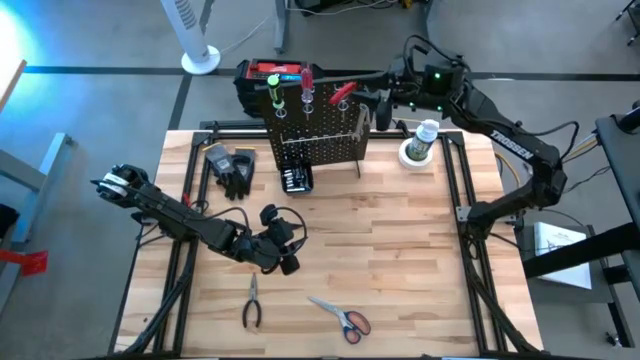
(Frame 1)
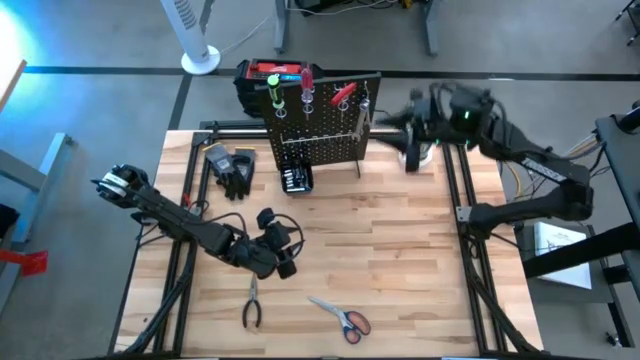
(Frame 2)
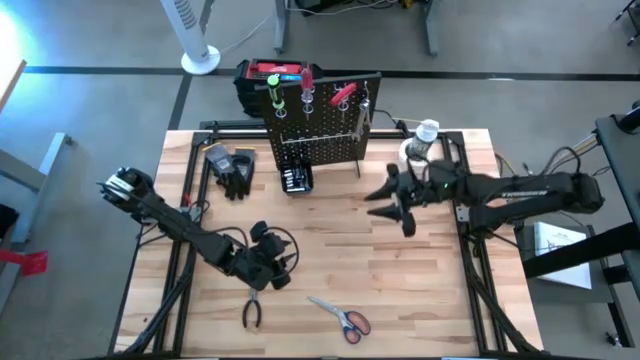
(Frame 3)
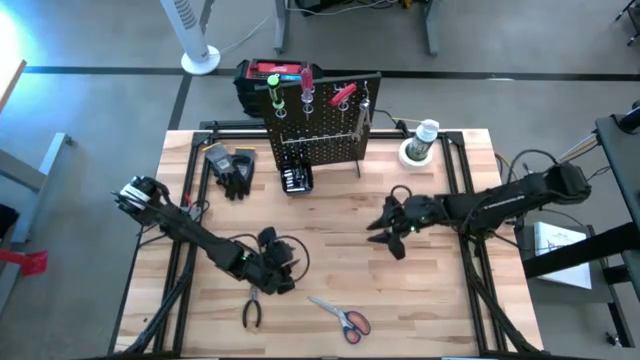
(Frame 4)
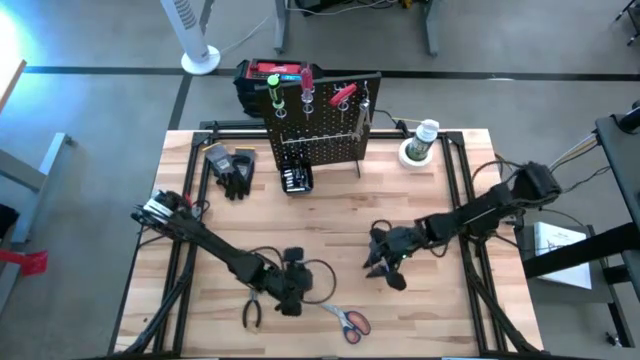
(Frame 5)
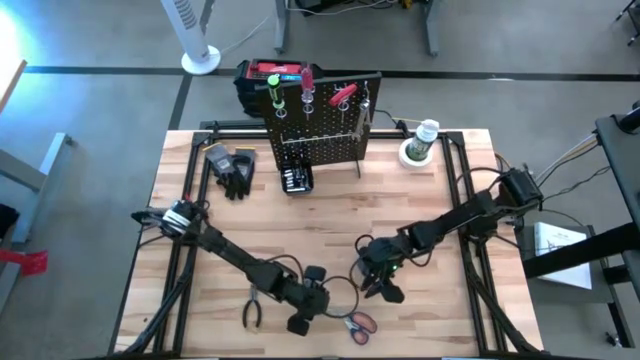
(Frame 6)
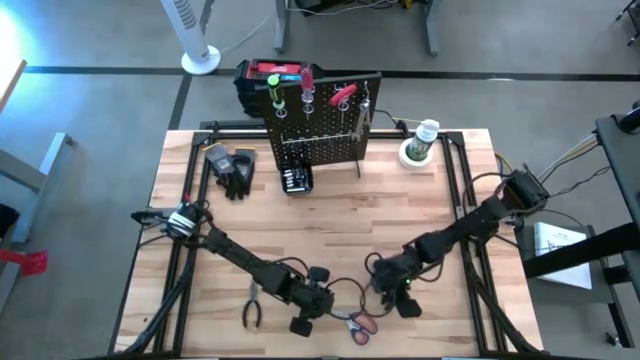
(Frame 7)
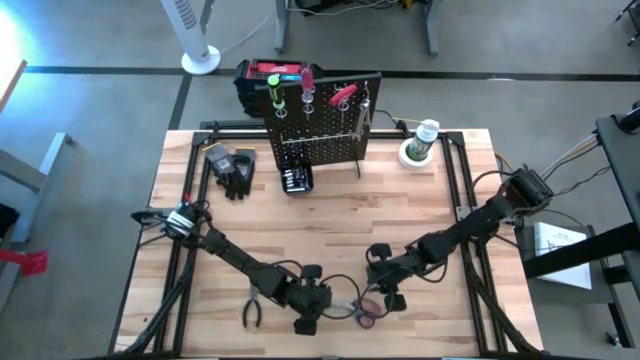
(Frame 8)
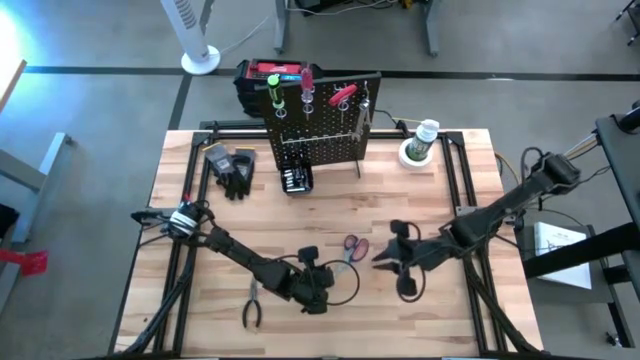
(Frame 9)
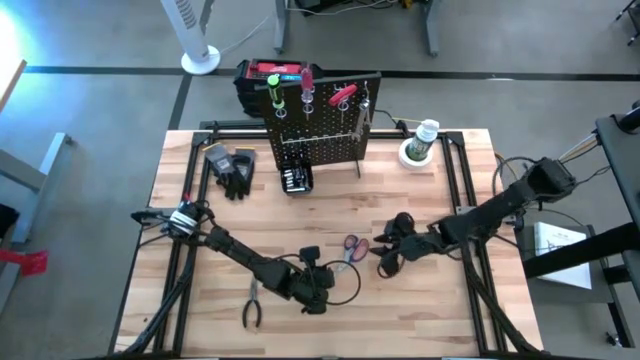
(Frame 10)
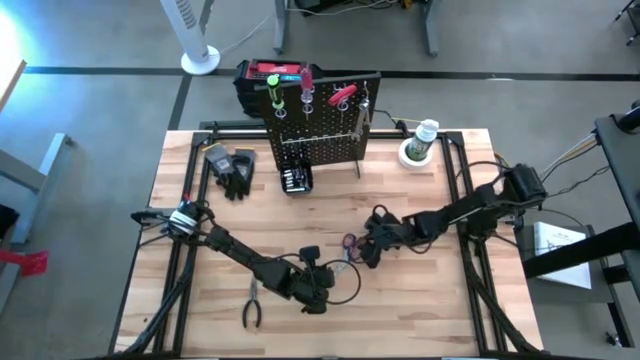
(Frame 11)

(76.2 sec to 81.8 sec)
Task: Hang tools onto peg board
Hang the blue scissors on the pegboard

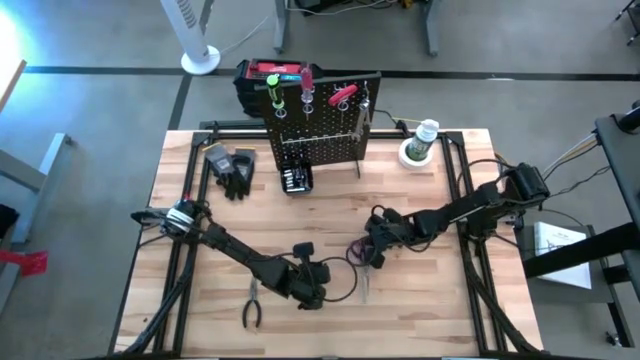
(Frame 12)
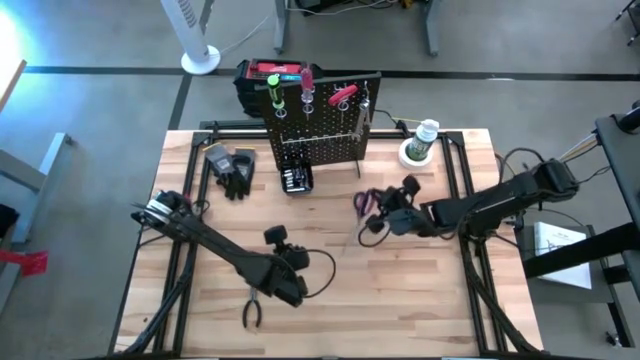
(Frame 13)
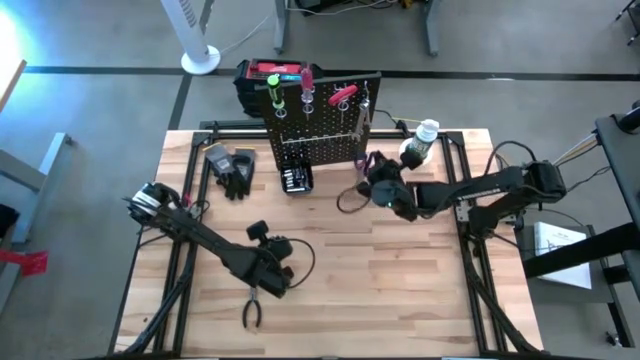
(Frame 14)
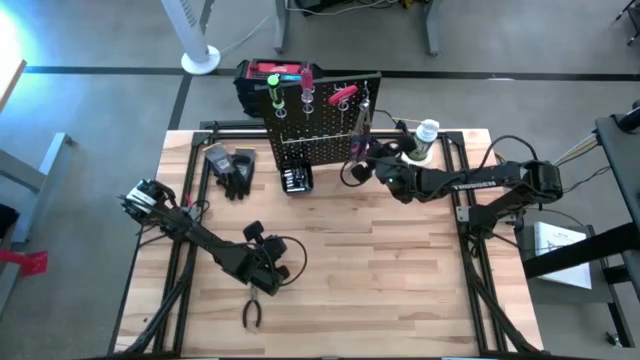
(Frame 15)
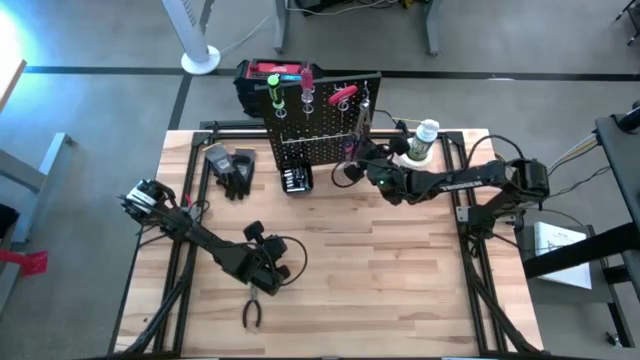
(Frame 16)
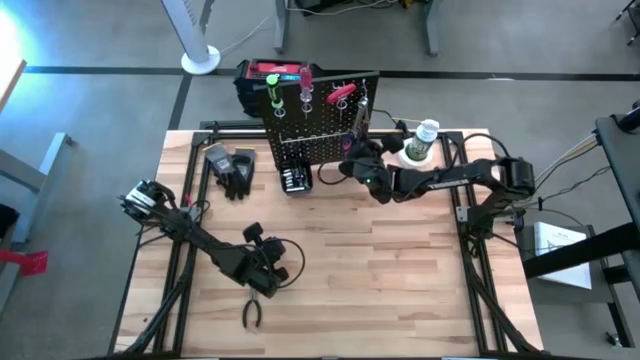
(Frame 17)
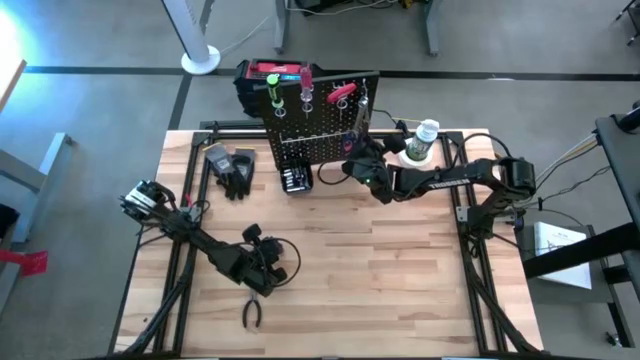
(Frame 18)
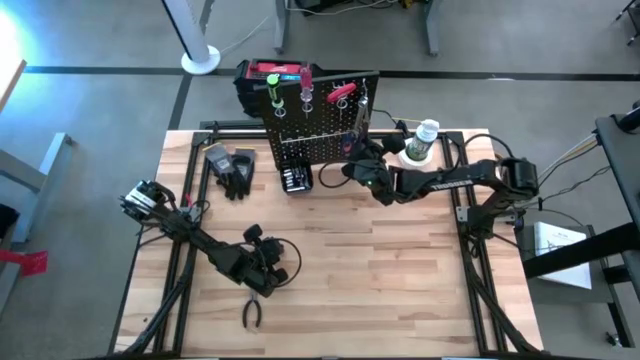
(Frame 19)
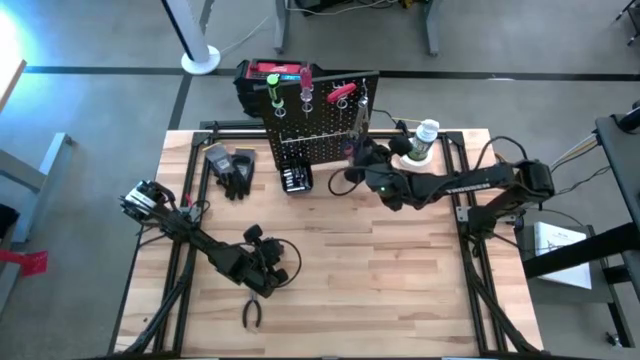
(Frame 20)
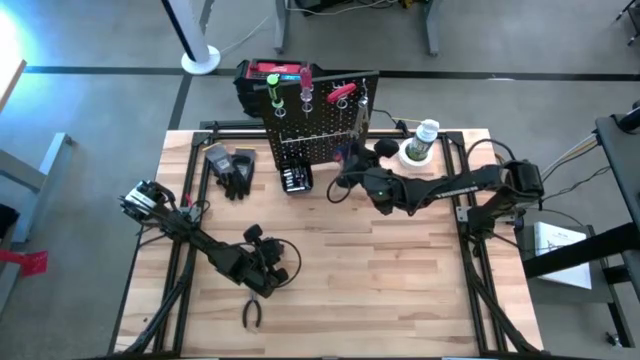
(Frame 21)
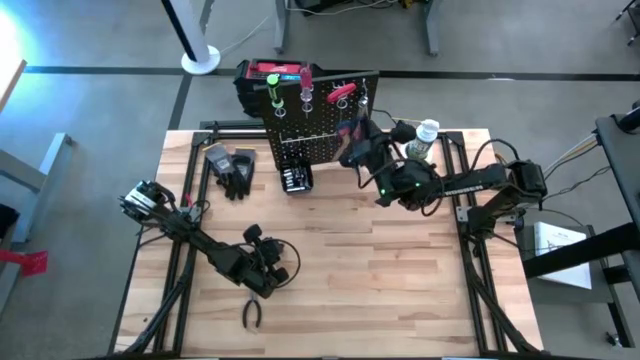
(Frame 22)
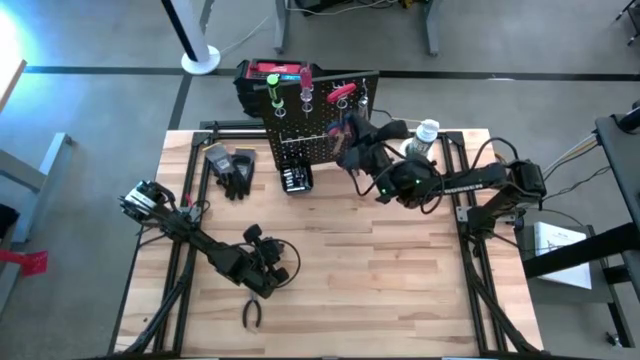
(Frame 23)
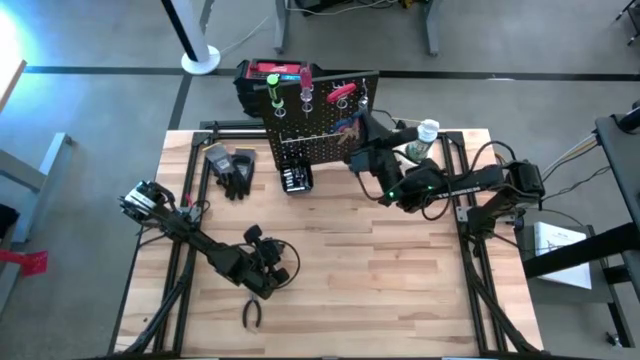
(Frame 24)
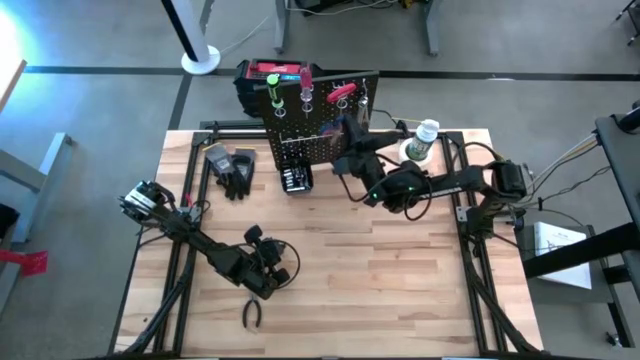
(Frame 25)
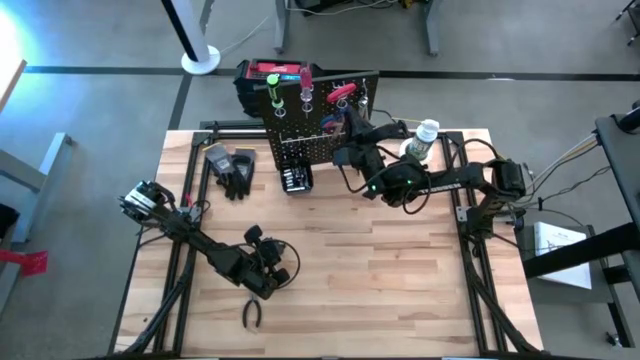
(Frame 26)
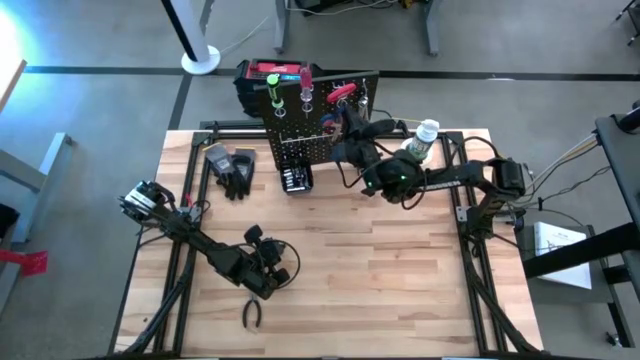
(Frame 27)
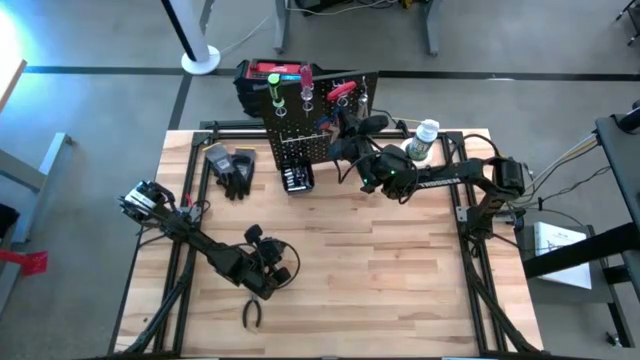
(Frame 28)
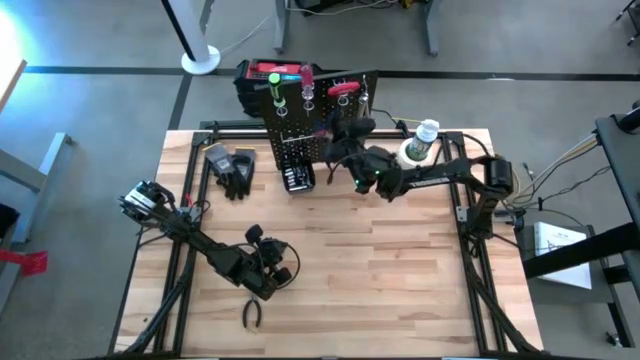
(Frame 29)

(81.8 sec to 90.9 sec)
Hang the blue scissors on the pegboard

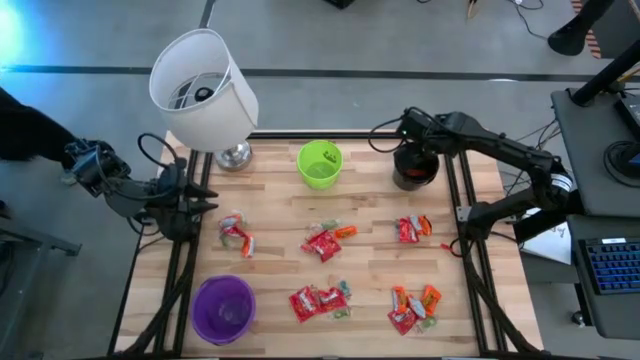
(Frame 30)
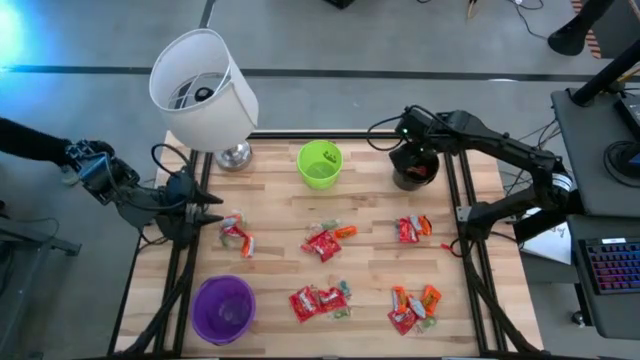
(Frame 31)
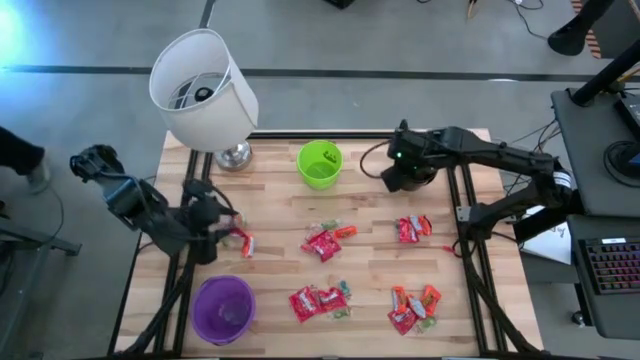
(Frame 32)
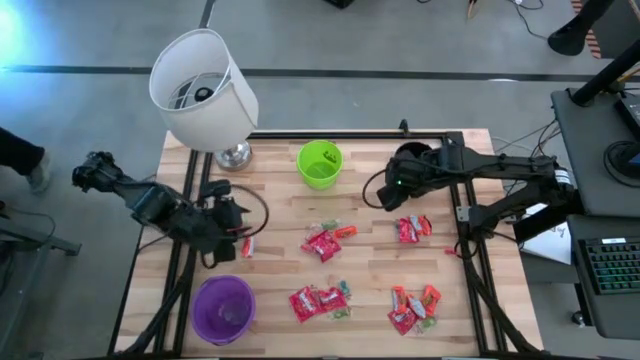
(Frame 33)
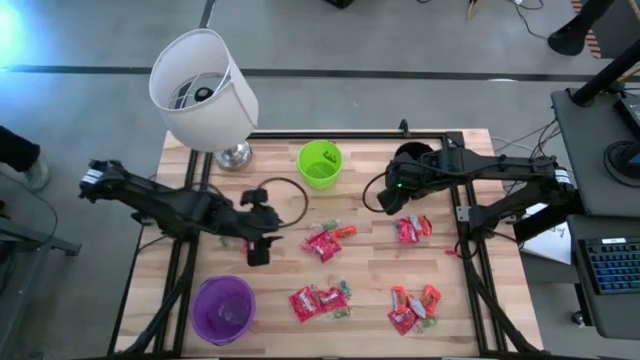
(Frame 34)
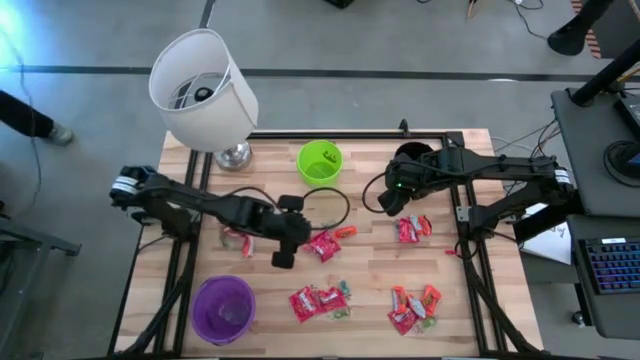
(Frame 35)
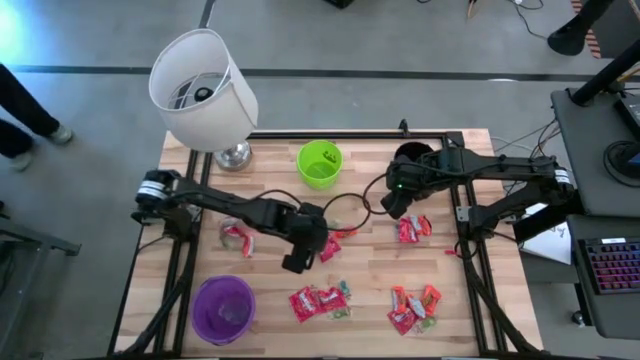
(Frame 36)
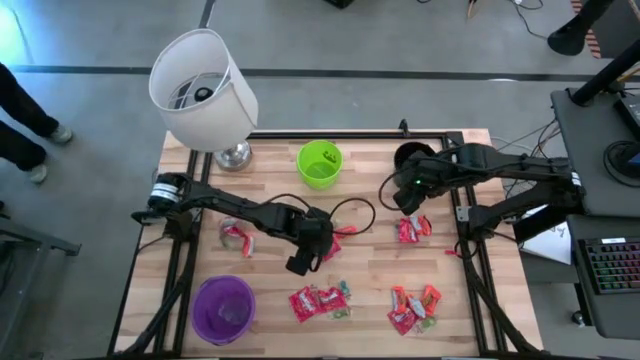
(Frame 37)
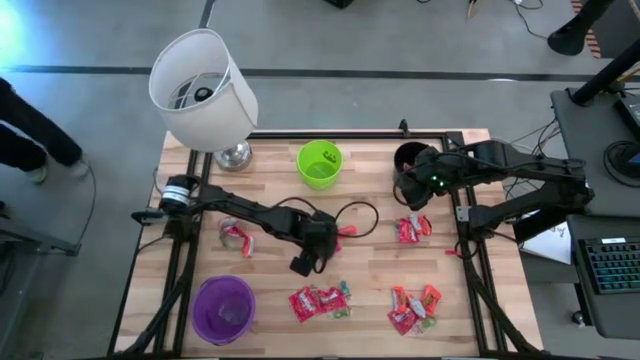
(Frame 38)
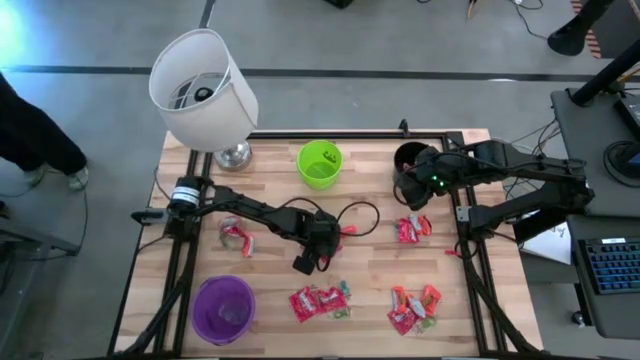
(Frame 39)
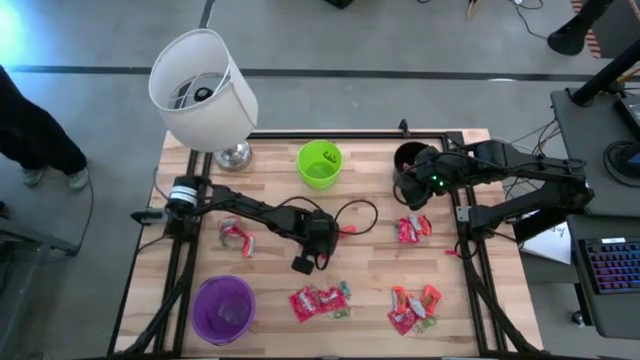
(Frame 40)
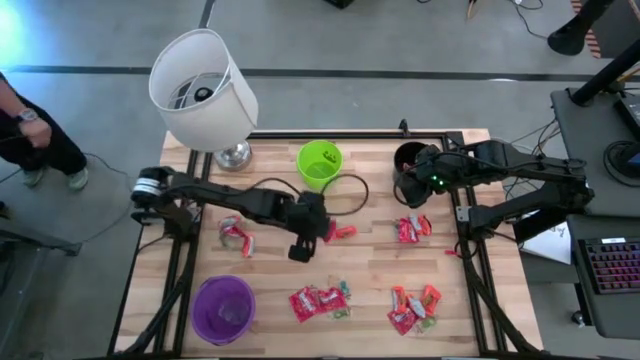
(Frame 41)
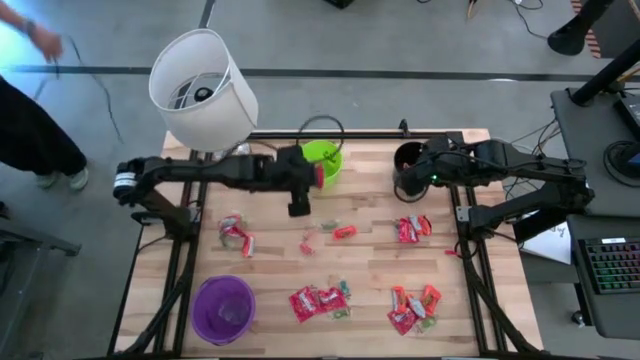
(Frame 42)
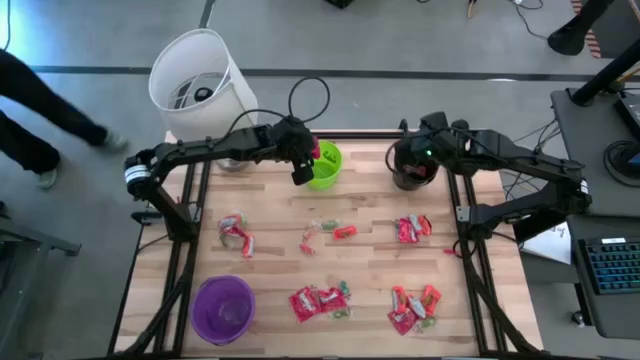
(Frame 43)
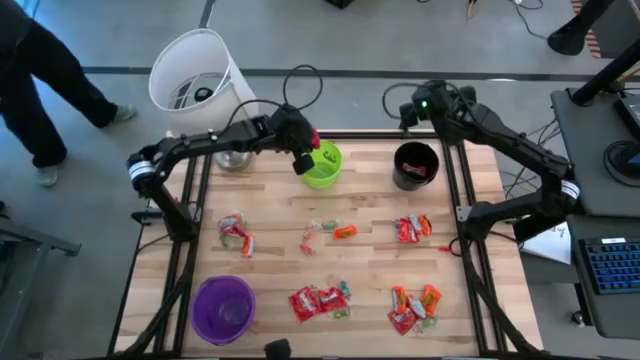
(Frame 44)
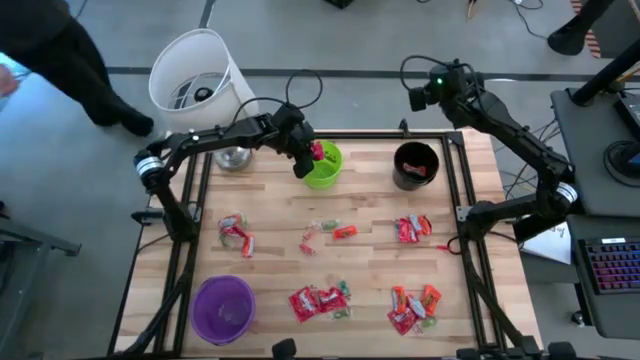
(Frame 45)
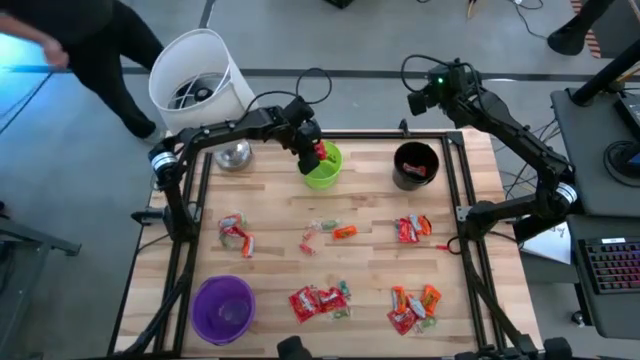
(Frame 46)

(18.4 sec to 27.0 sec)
Task: Sort candy
Put the red candy into the green bucket
